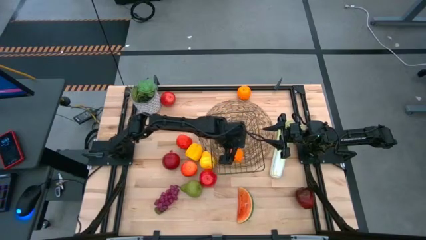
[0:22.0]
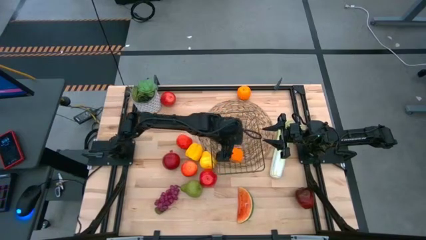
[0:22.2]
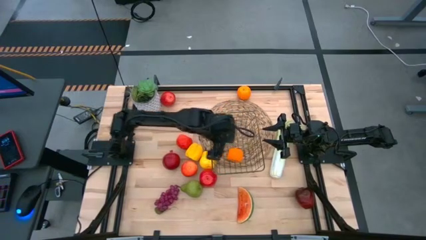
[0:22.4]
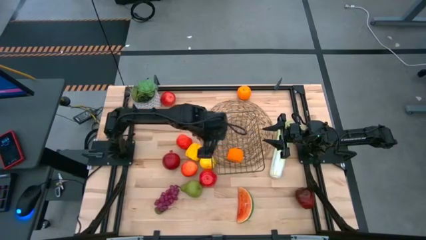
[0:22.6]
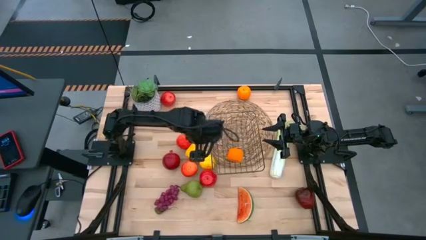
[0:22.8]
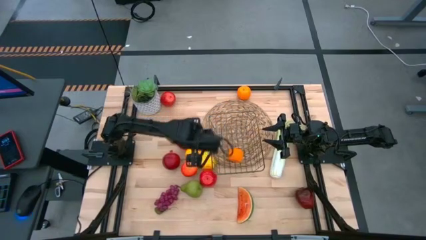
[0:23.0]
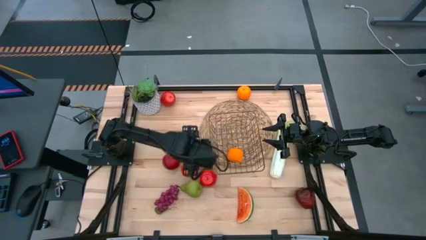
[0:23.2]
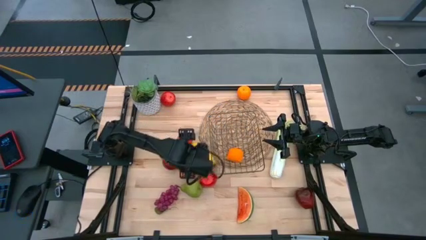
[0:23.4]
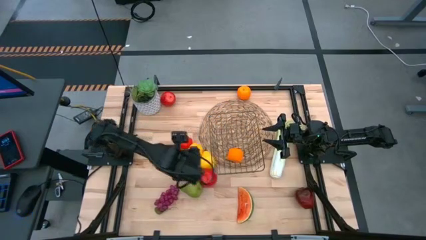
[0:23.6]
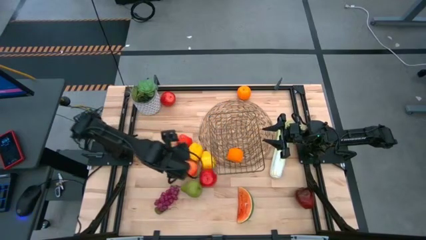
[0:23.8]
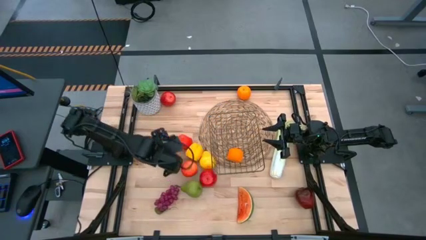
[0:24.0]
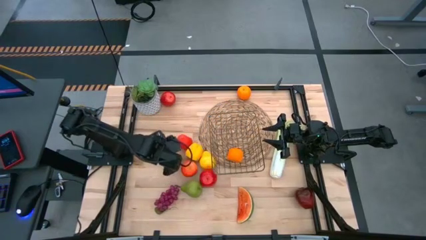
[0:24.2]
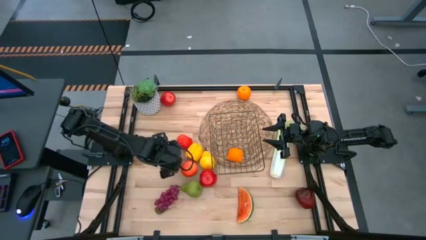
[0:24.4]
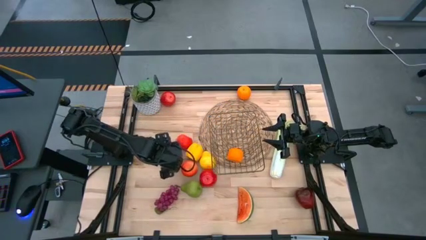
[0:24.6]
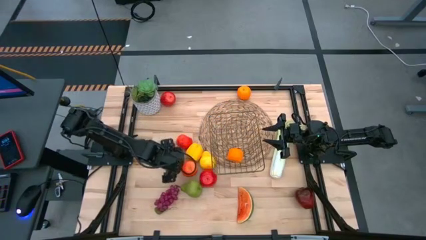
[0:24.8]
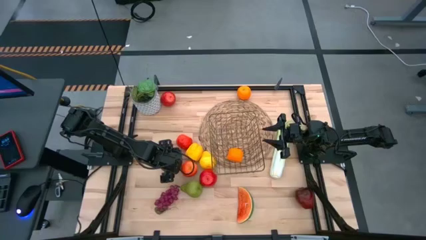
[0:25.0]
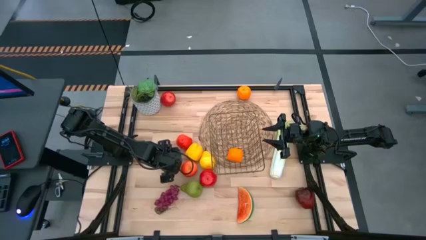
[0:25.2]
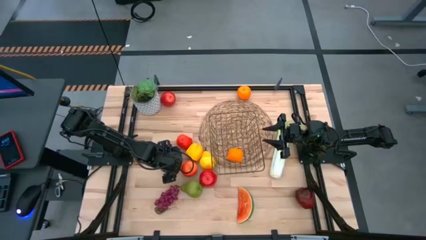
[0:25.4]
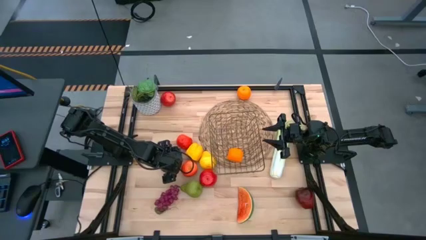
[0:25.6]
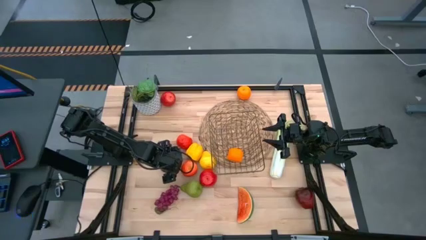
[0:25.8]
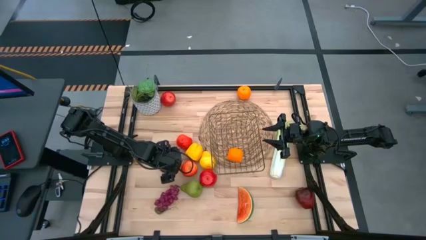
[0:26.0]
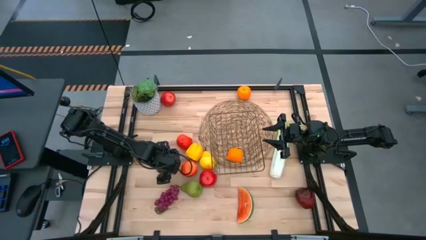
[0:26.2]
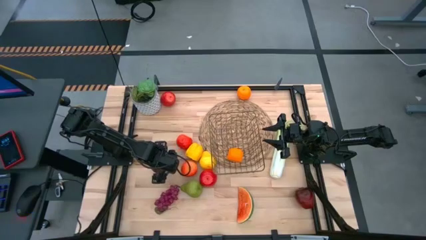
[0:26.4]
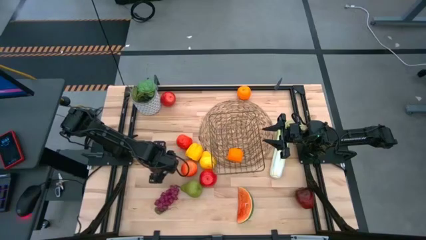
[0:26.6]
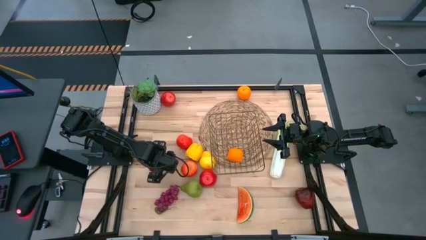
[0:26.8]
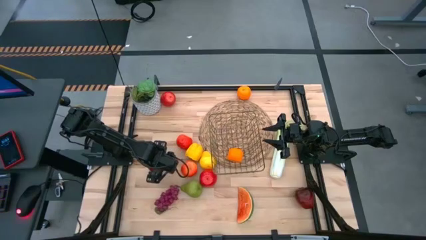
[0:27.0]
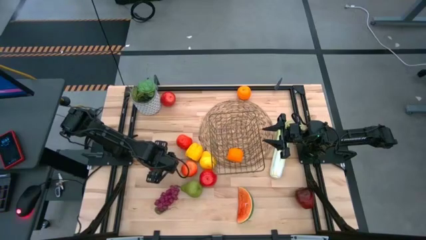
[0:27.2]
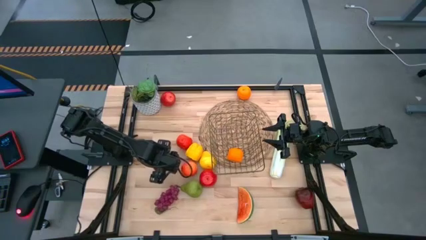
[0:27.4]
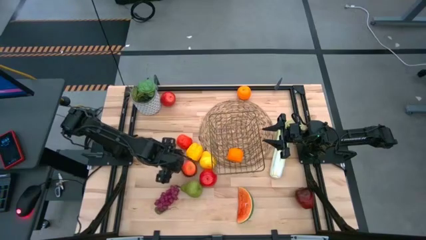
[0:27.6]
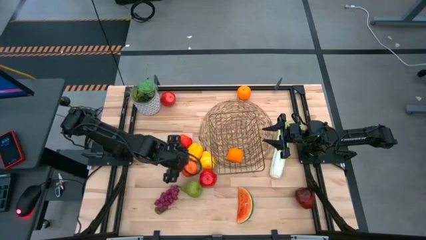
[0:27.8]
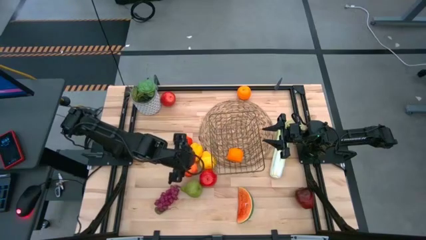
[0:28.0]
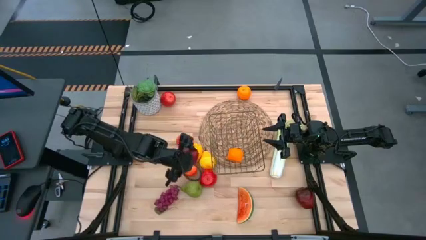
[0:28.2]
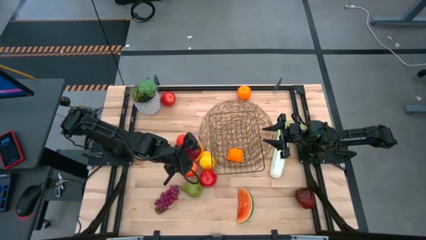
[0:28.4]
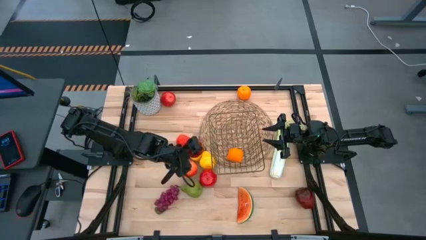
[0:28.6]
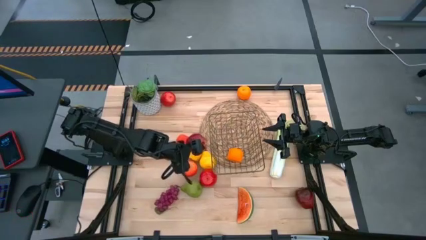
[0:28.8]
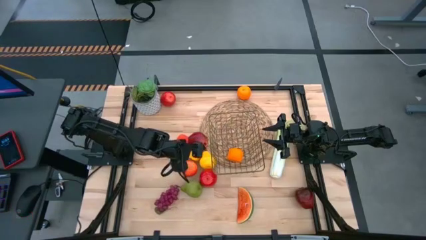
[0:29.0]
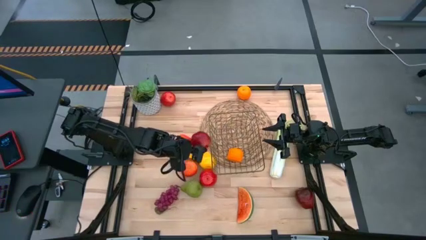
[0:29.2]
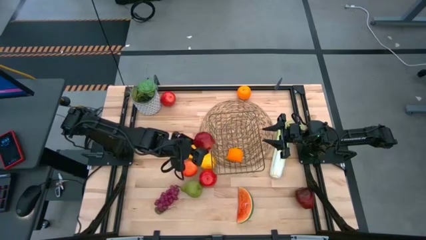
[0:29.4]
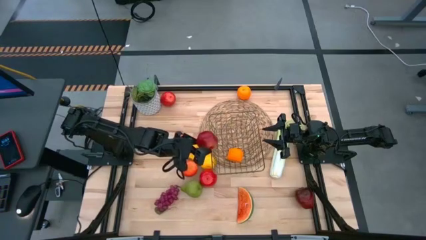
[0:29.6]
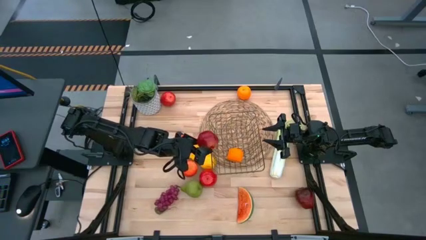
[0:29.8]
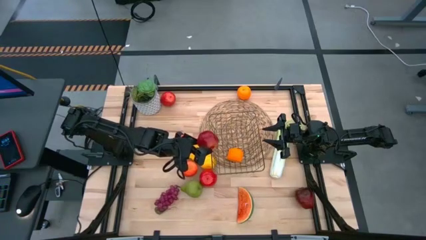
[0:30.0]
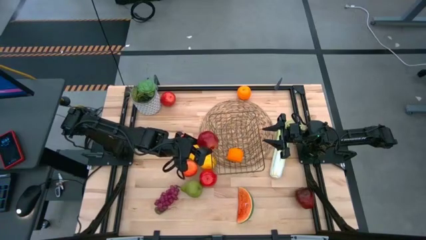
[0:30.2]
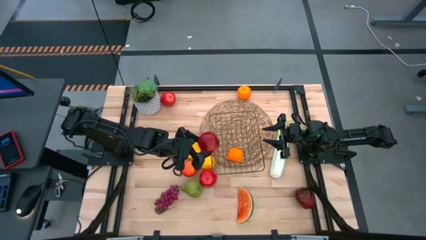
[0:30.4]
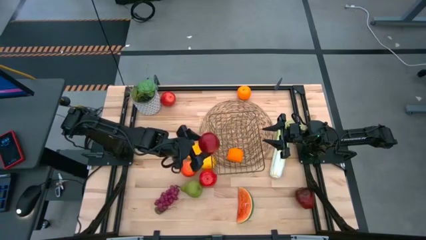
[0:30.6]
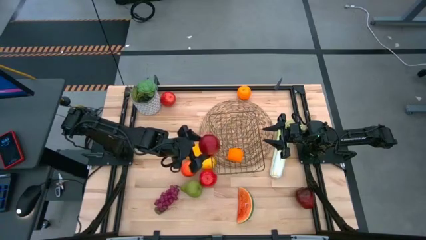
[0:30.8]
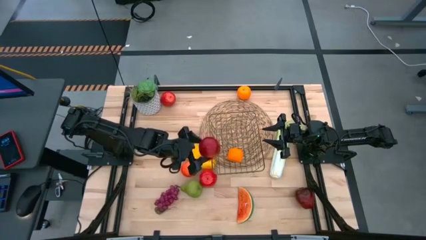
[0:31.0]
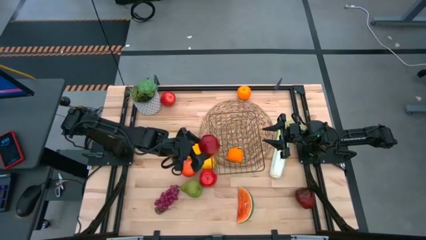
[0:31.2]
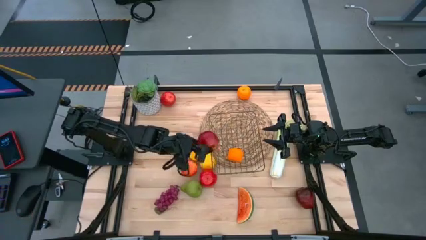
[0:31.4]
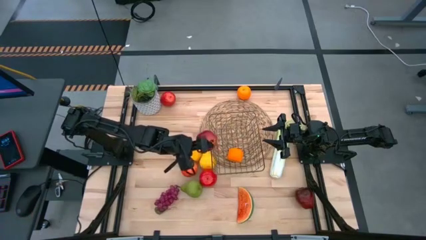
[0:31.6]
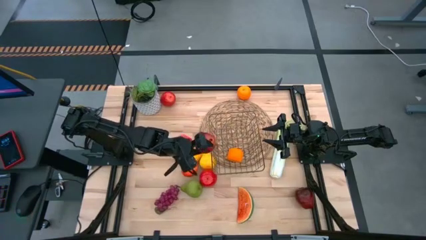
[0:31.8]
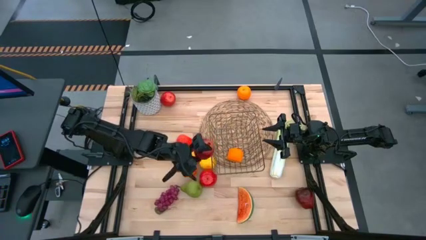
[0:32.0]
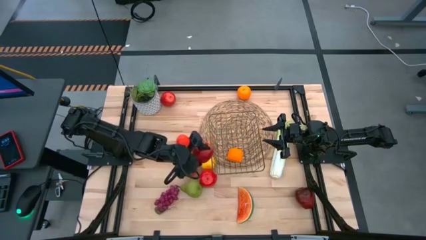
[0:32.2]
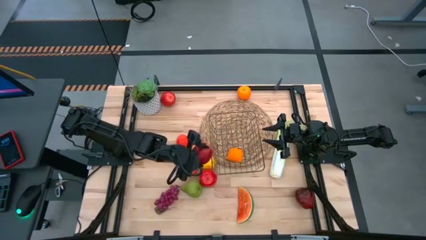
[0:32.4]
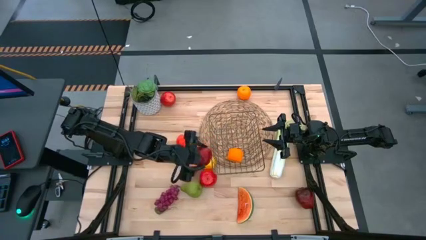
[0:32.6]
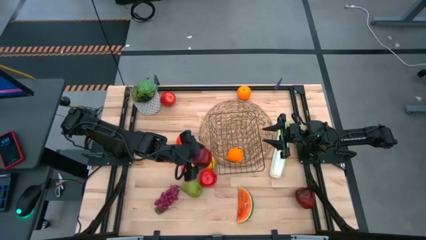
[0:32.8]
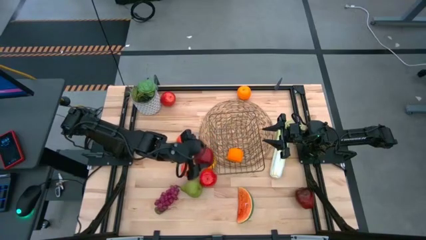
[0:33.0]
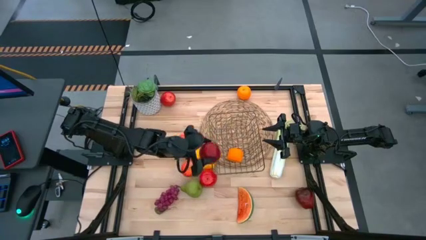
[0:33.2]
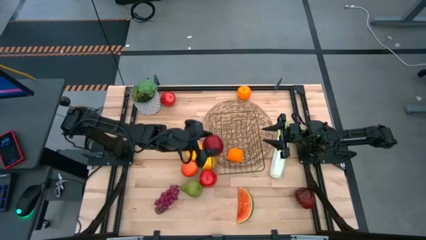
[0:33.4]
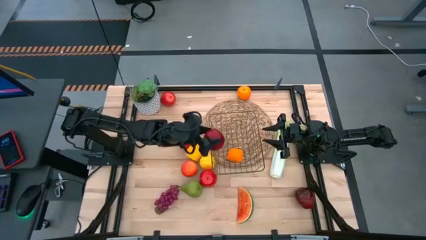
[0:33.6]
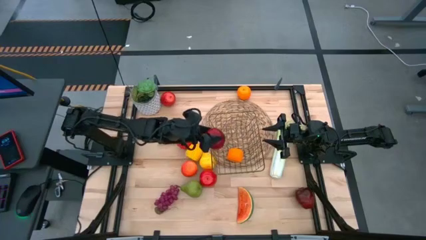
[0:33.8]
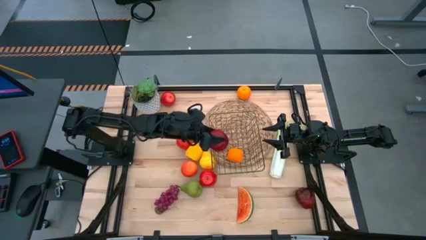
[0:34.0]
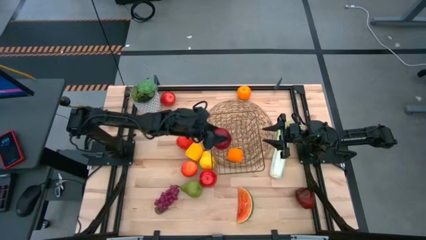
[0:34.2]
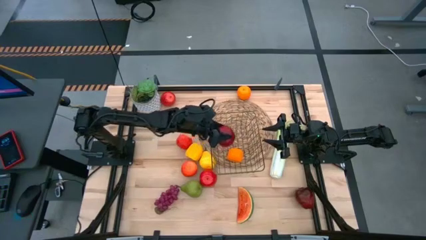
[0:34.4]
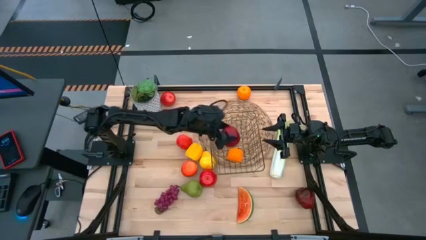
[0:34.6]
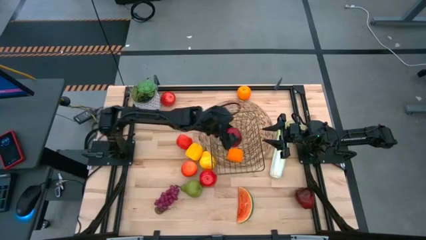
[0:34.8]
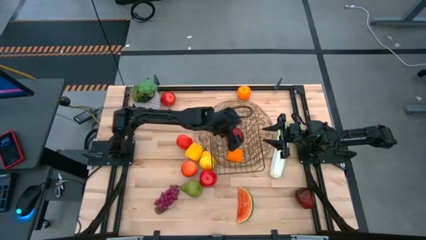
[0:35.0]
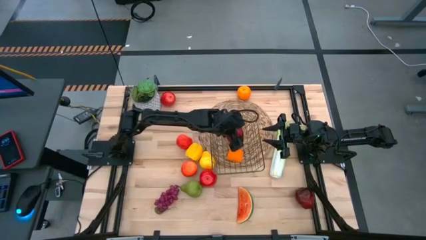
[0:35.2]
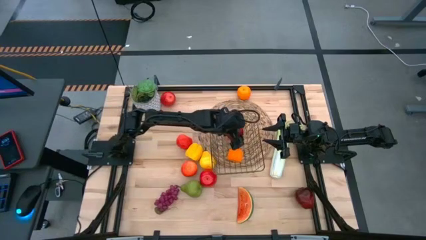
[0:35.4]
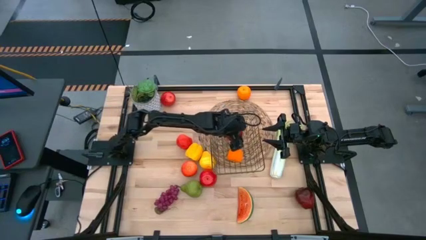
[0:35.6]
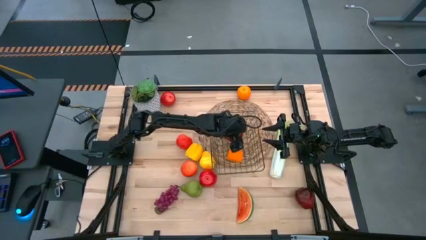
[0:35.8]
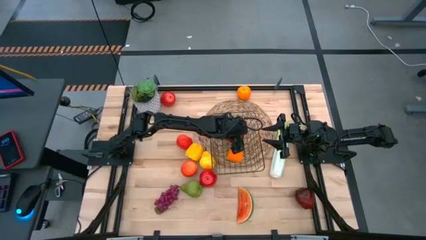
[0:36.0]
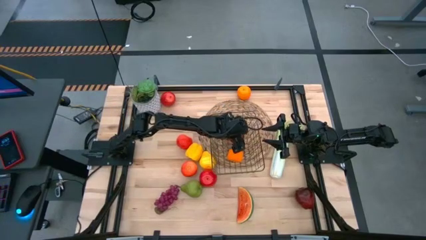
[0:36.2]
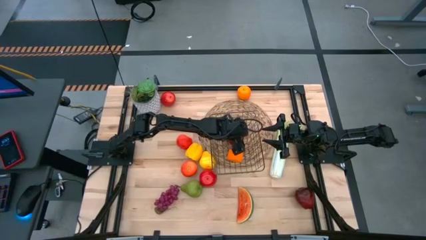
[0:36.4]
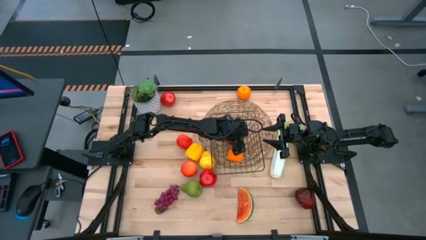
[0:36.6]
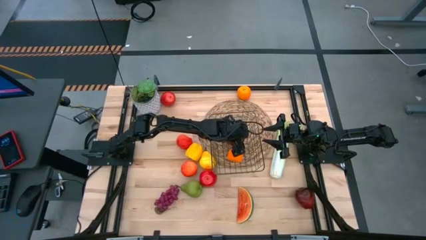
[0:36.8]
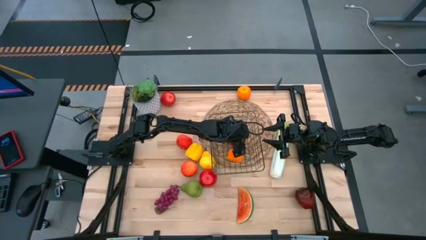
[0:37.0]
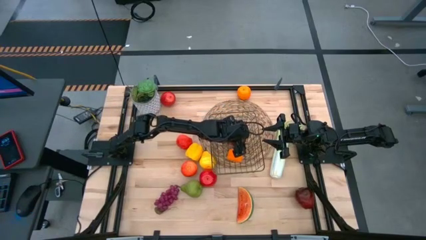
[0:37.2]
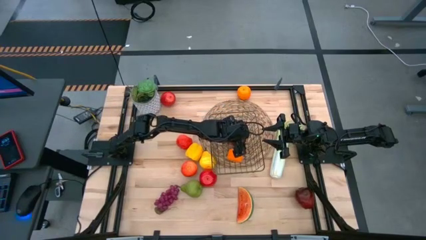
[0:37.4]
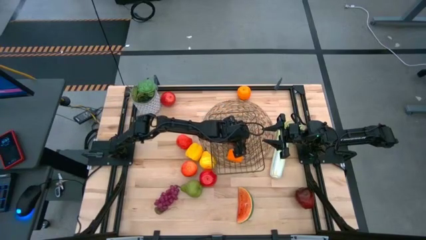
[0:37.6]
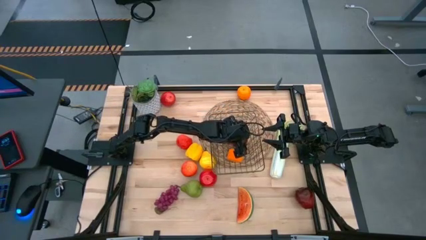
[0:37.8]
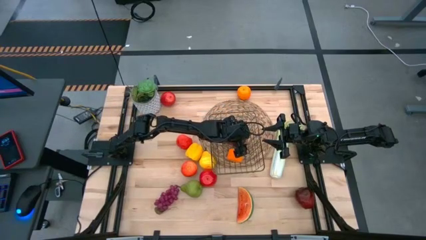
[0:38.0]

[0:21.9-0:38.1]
Task: Build produce basket
Put the pomegranate into the wire basket
